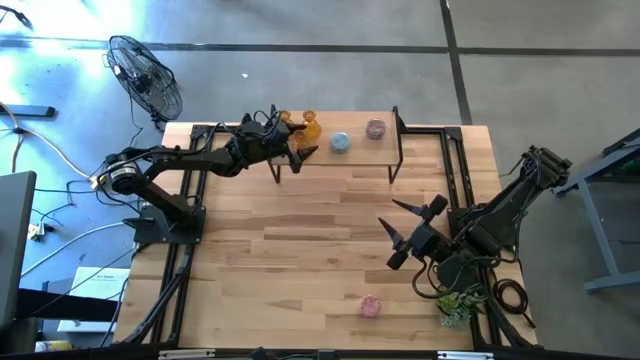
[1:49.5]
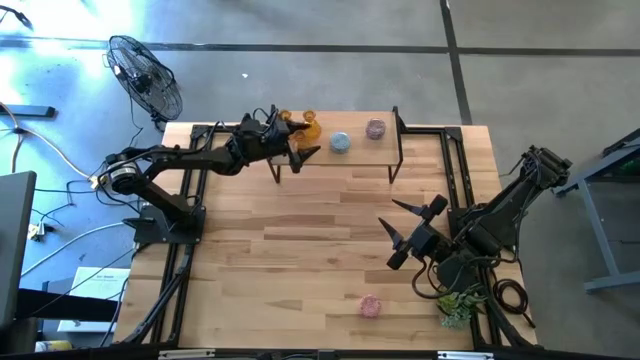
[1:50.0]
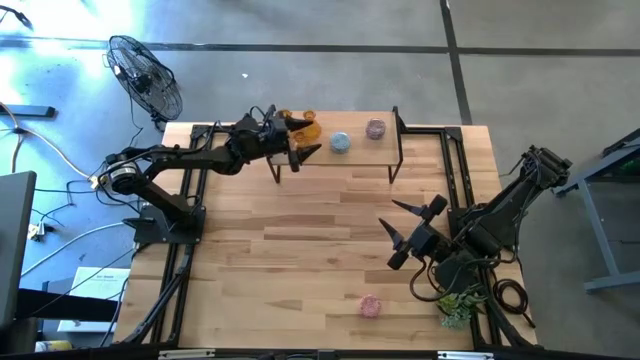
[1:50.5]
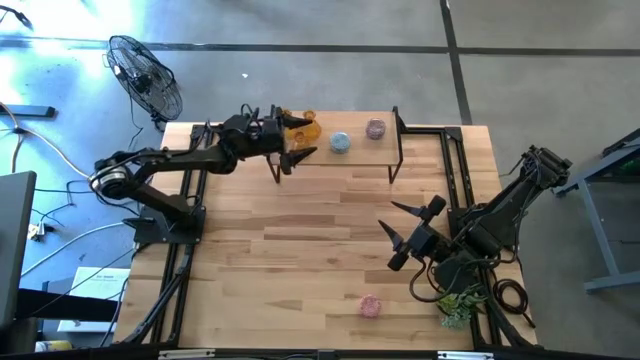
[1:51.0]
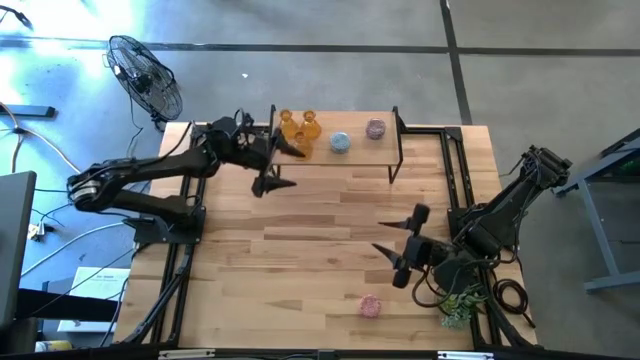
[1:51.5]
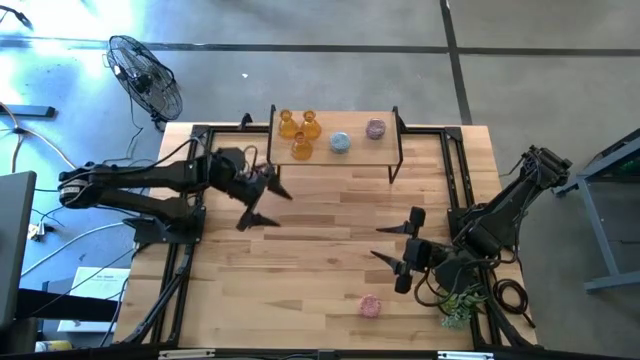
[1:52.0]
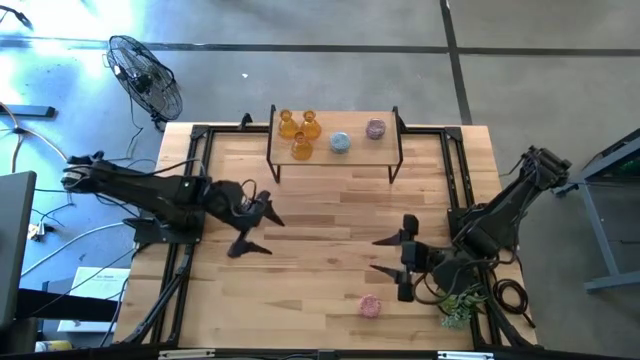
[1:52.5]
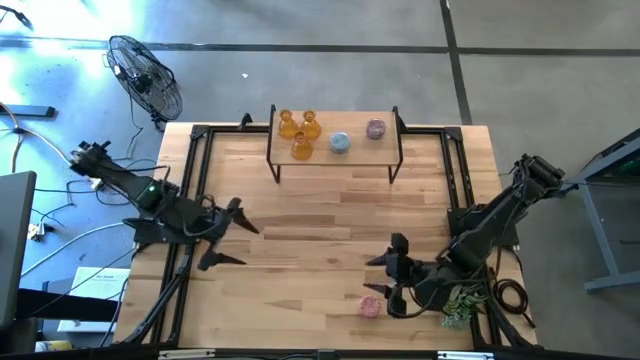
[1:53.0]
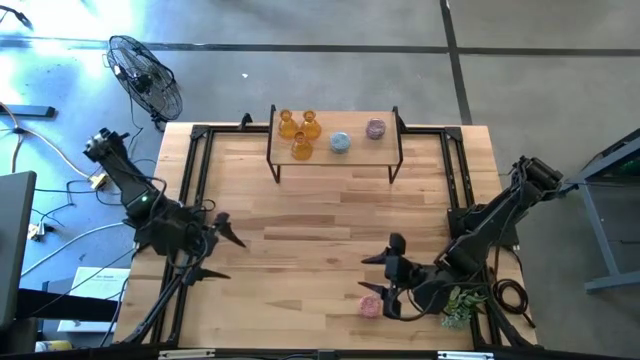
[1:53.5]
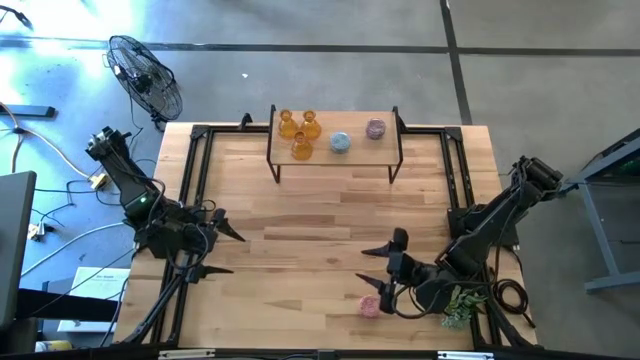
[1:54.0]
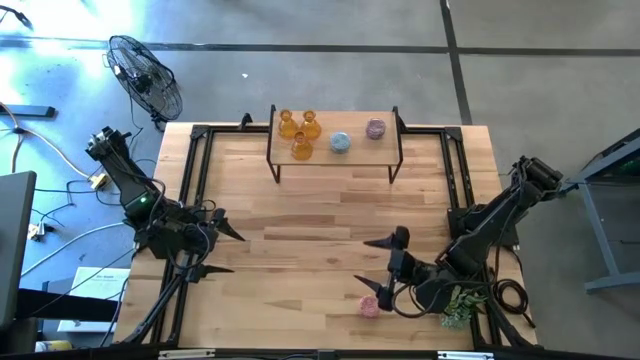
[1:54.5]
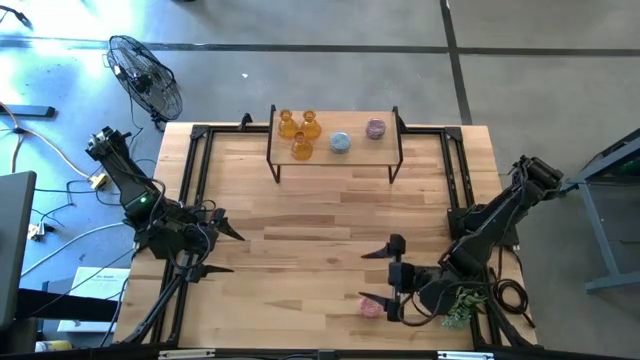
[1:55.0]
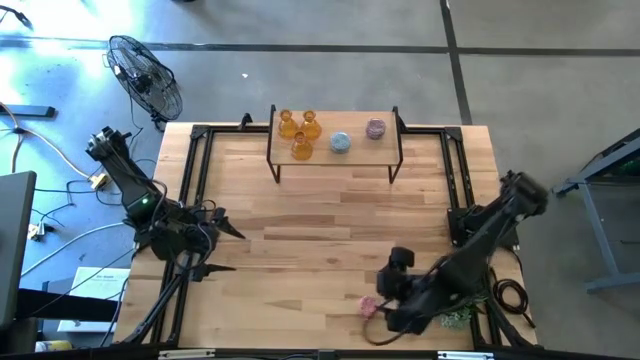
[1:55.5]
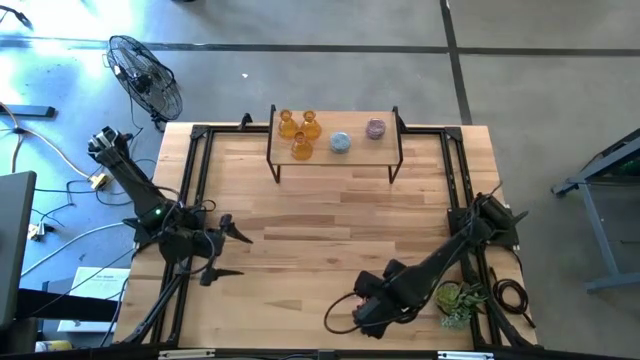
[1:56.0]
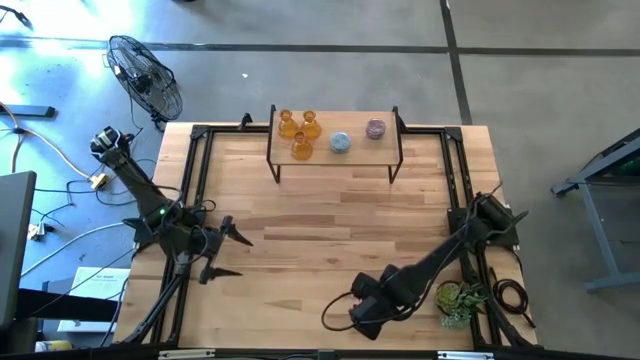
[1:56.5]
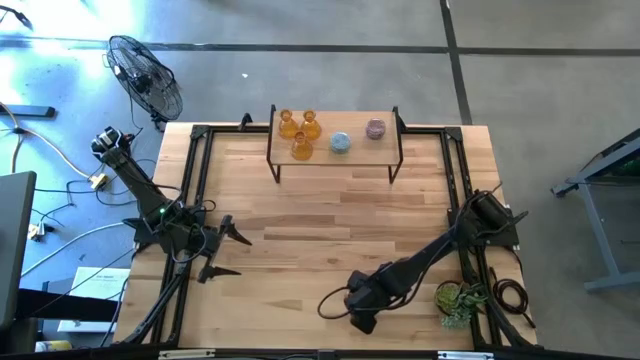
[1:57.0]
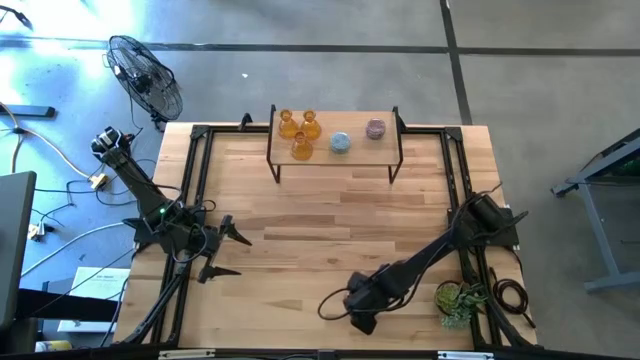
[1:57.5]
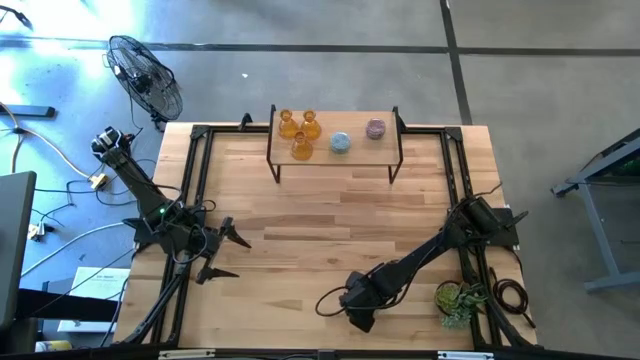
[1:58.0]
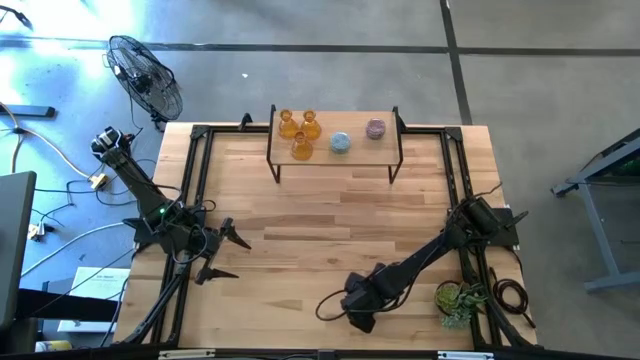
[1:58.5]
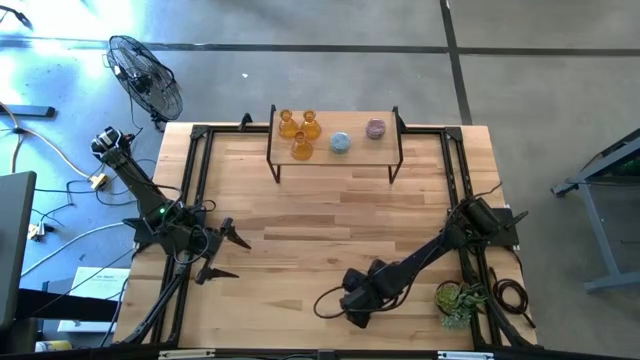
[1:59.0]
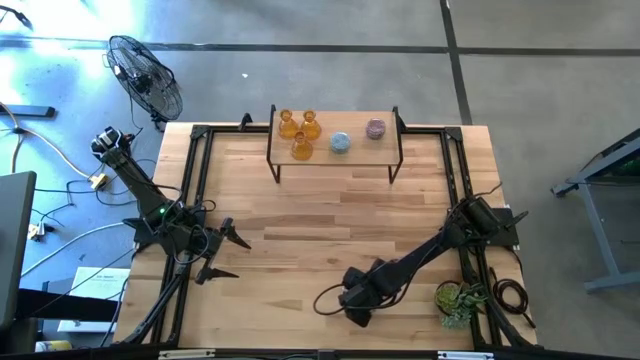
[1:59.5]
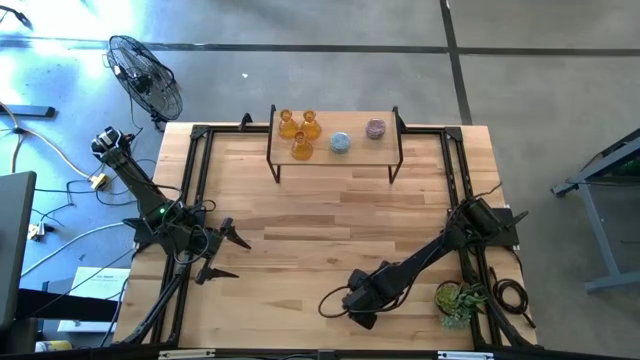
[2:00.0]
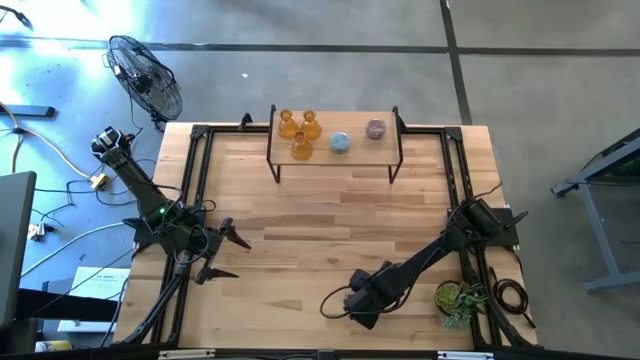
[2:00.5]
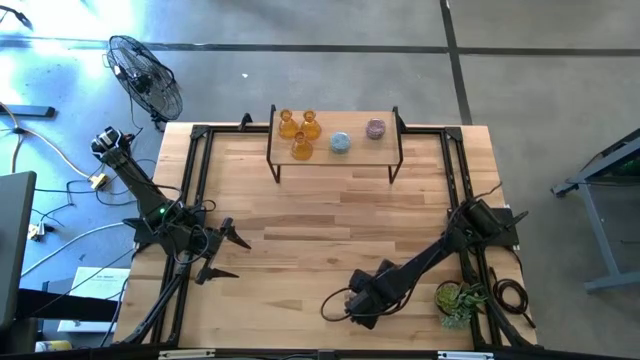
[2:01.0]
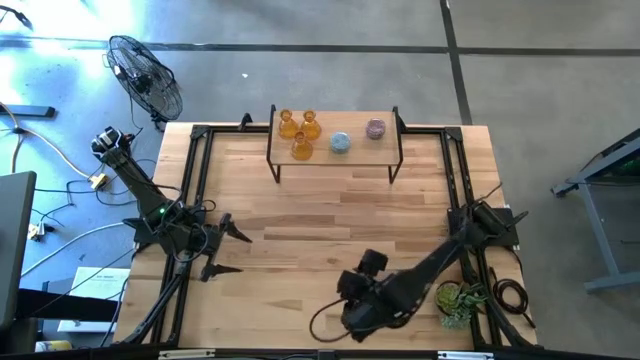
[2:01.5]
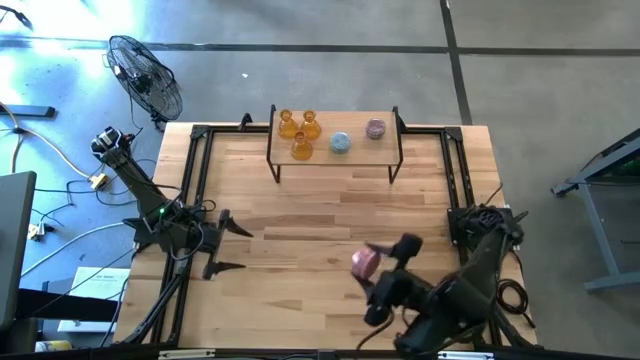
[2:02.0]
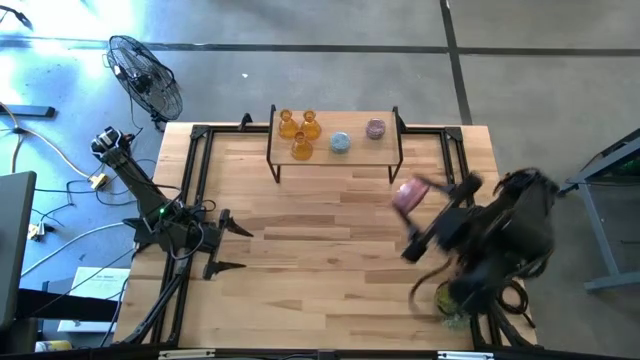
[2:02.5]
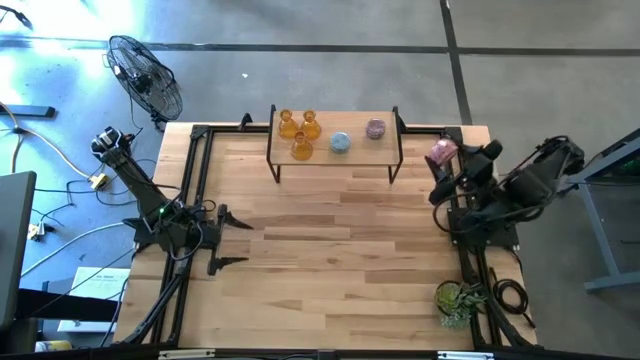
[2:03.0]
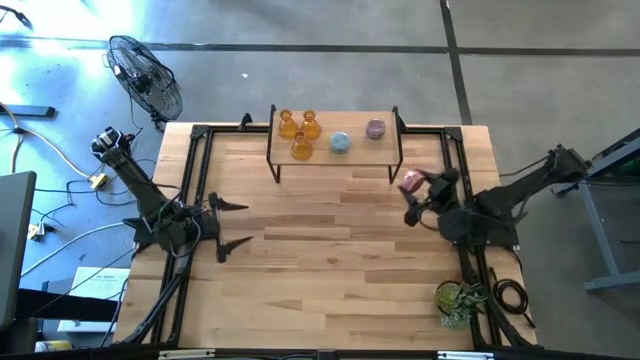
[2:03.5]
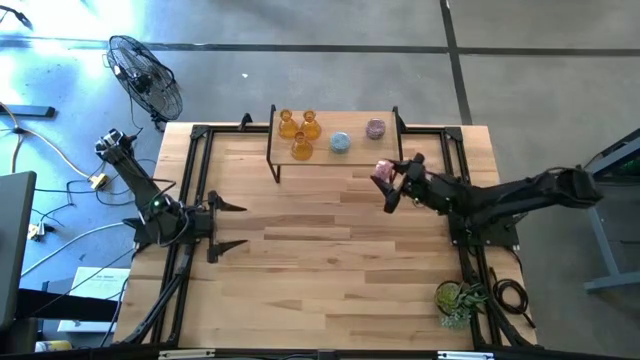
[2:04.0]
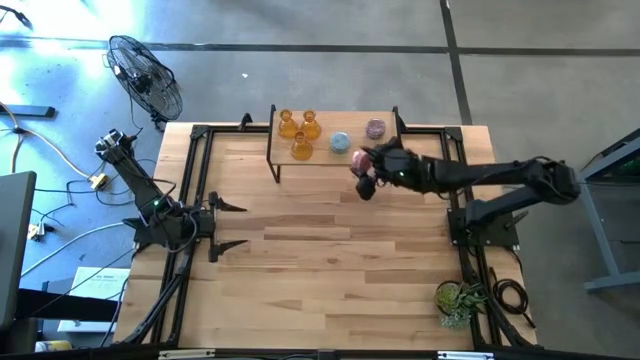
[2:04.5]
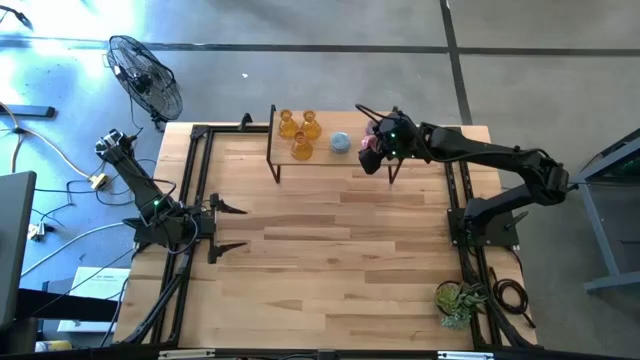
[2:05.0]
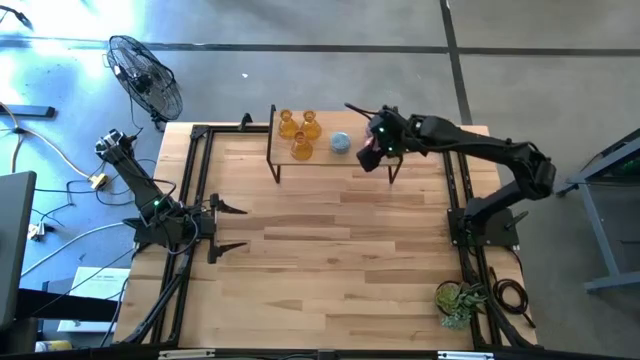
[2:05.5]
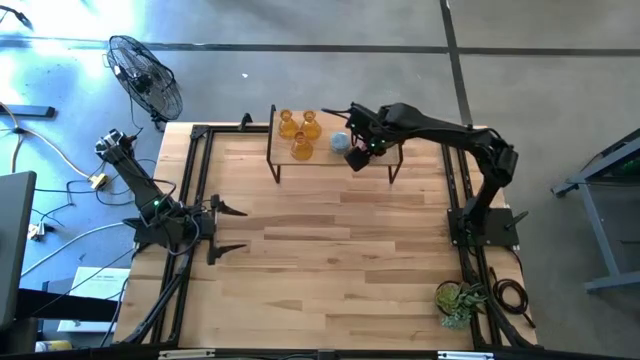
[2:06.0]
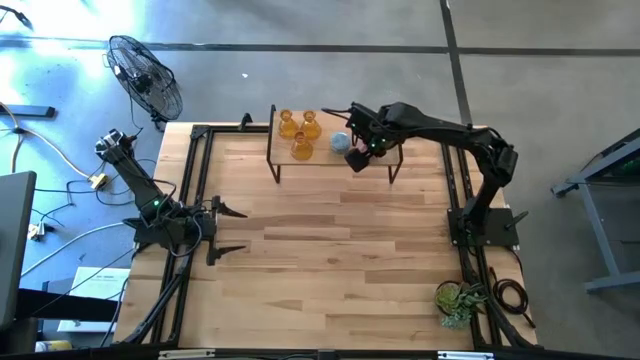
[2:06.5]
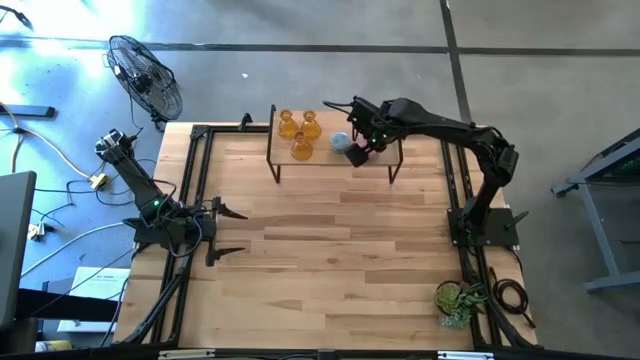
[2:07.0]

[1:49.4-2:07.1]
Task: Pick & Place candle stick holders
Put the pink white scented candle on the shelf

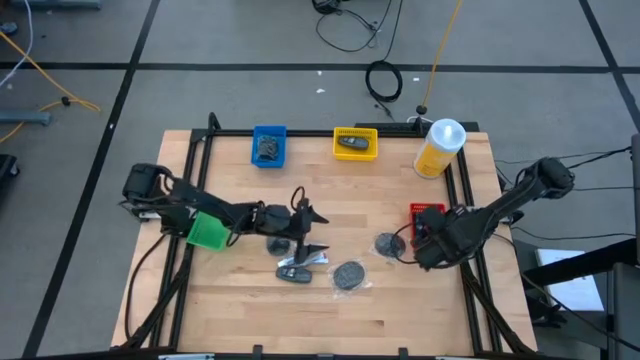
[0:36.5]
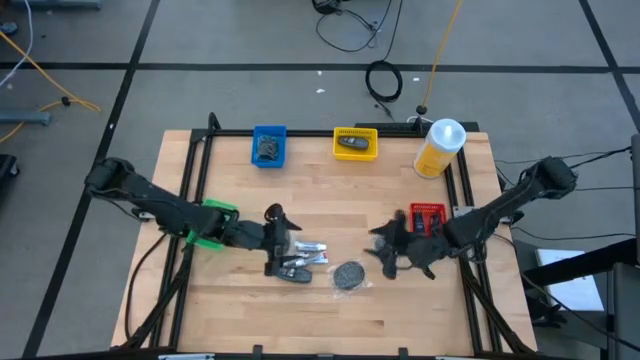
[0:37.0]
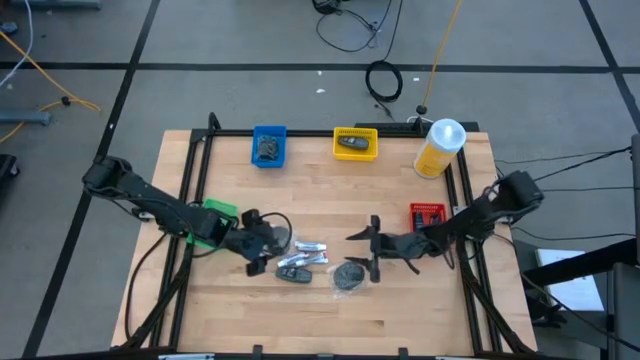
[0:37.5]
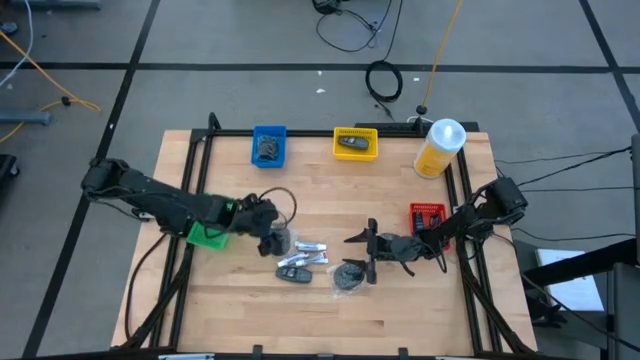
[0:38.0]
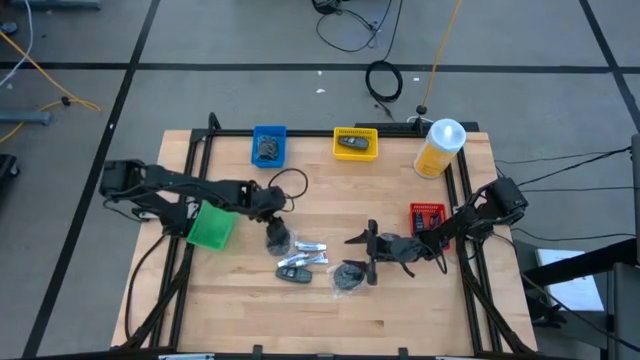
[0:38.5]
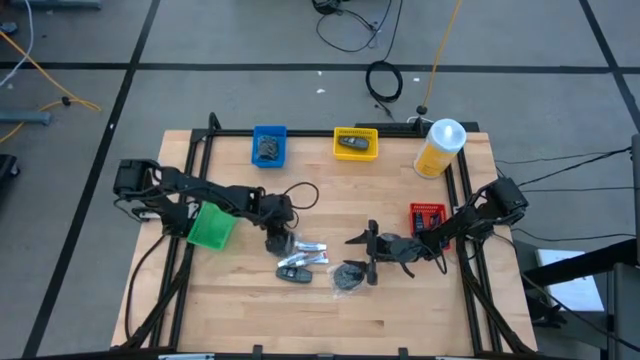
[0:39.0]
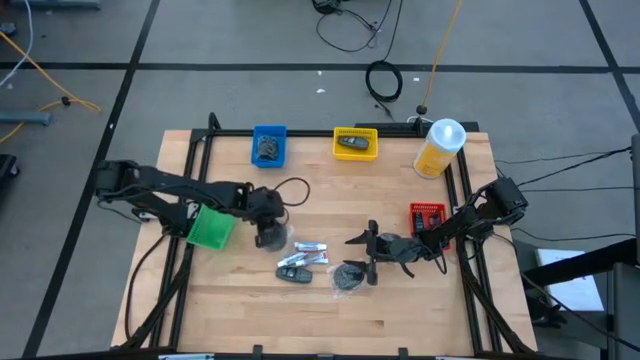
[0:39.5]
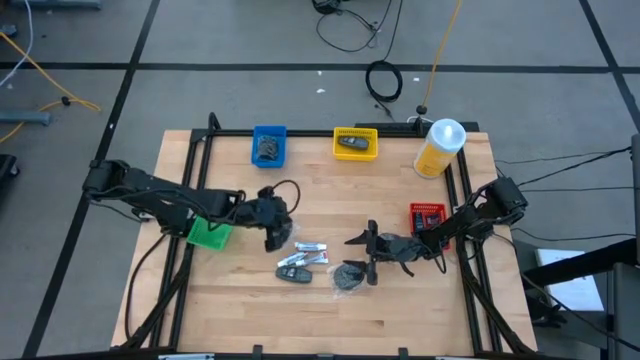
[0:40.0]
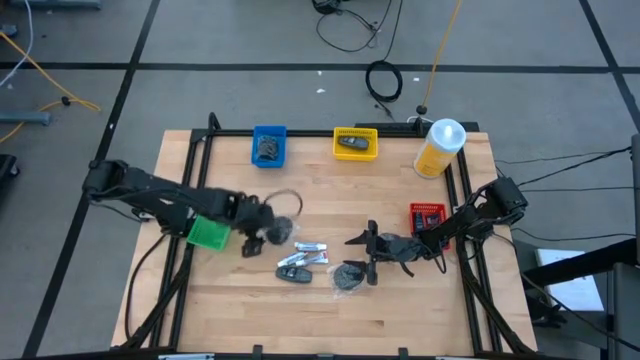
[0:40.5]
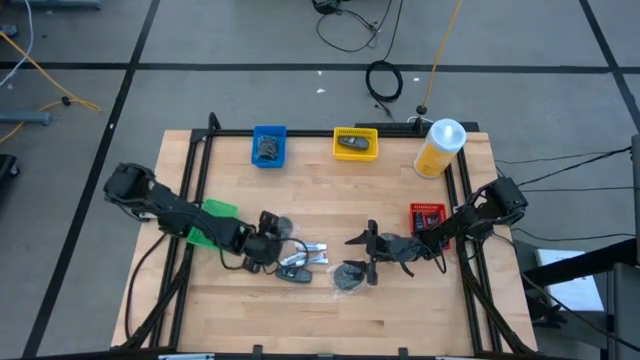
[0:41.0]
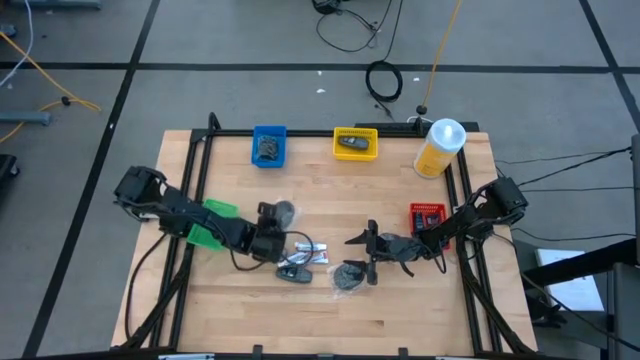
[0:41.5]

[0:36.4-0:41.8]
Task: Pick & Place Travel size toiletries
Put the black hairbrush into the blue bin
